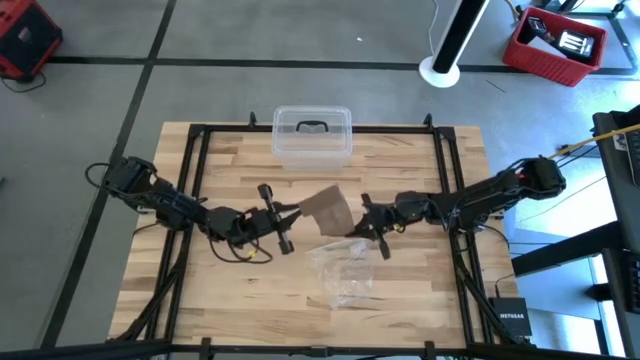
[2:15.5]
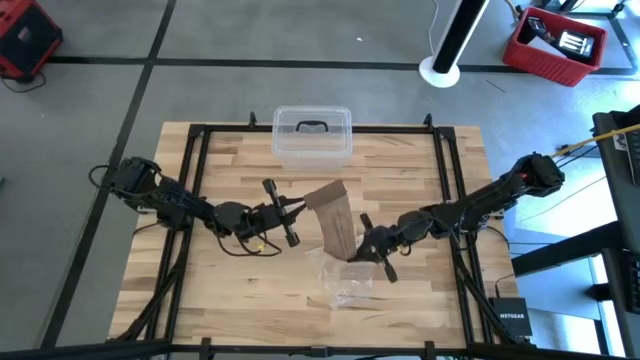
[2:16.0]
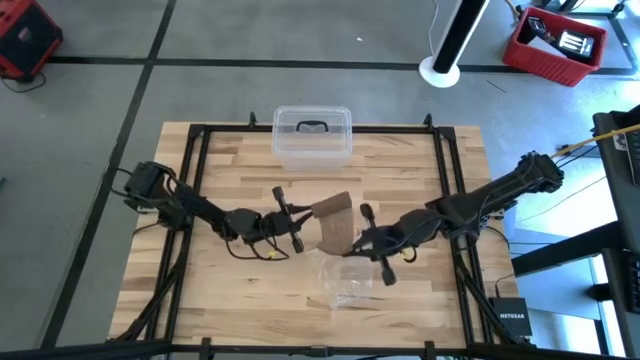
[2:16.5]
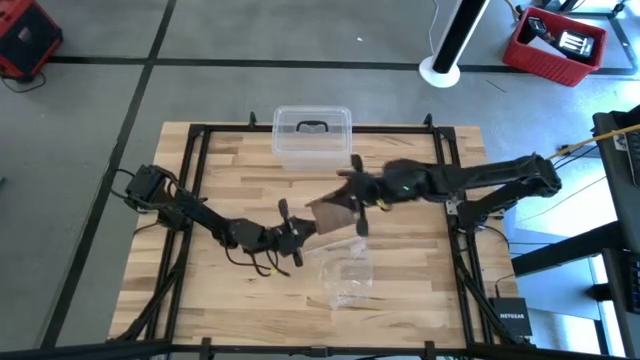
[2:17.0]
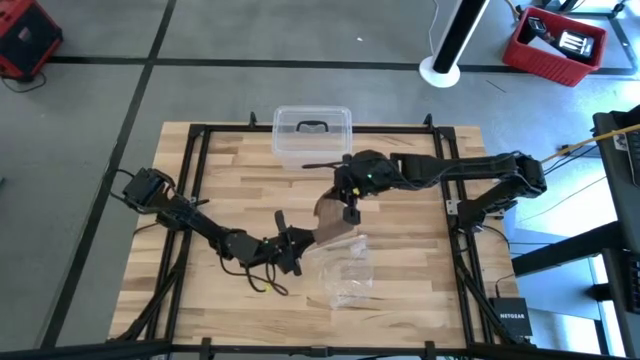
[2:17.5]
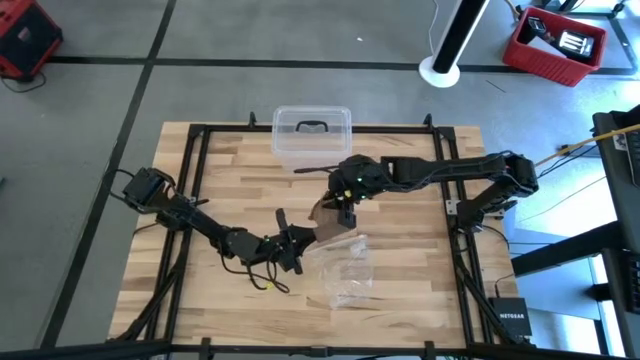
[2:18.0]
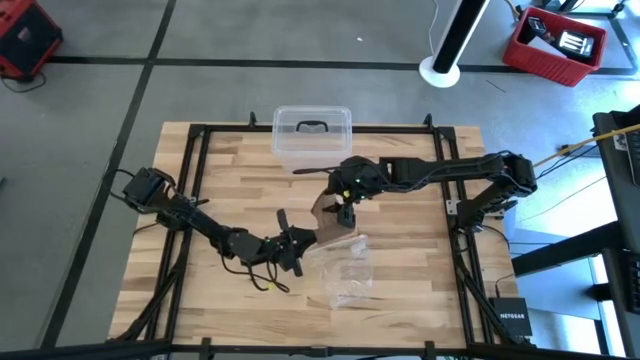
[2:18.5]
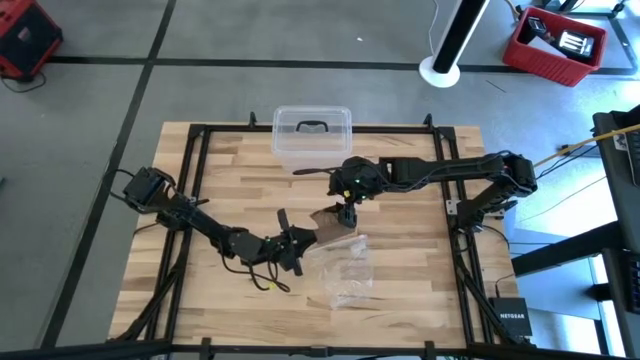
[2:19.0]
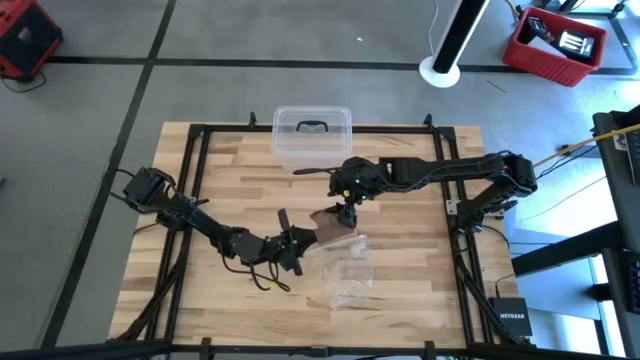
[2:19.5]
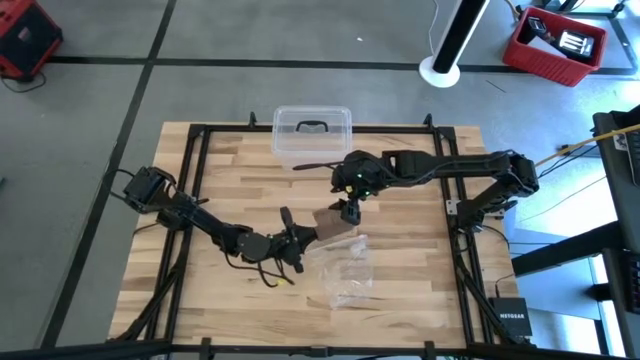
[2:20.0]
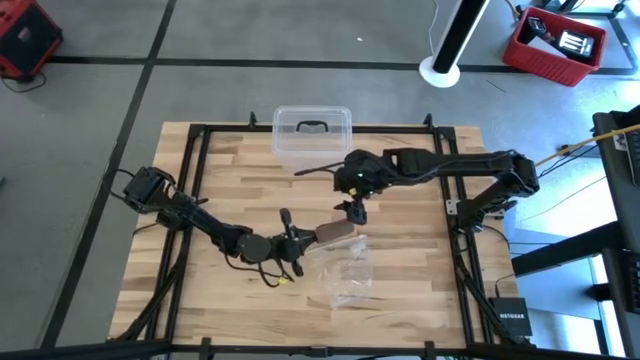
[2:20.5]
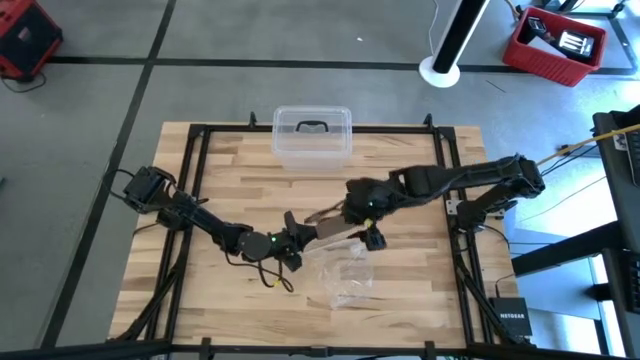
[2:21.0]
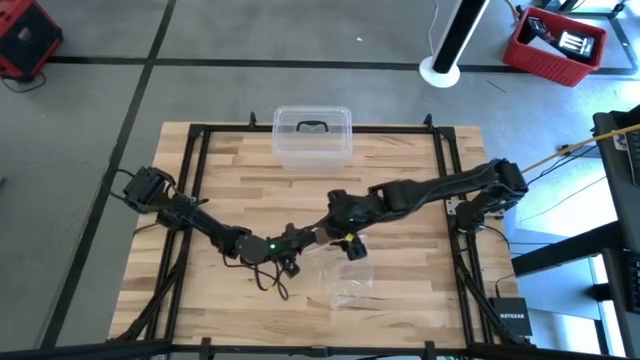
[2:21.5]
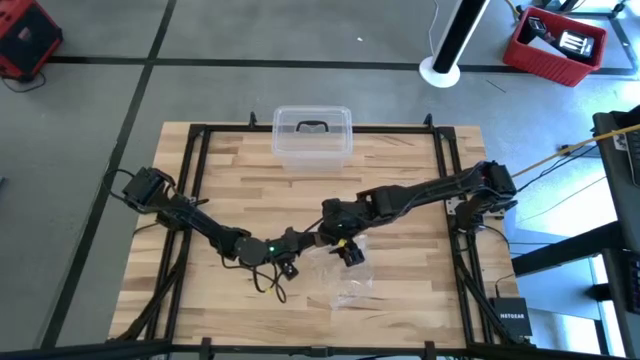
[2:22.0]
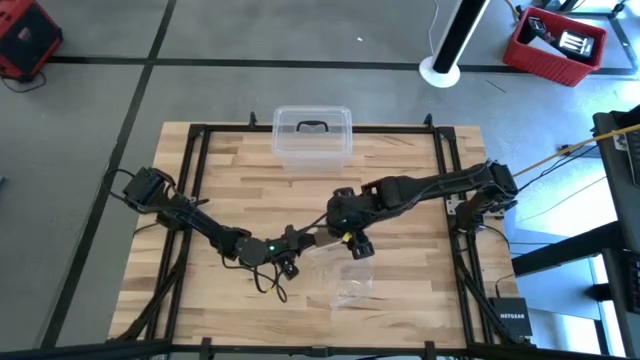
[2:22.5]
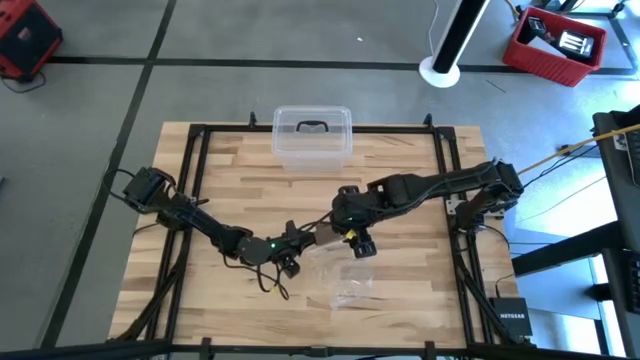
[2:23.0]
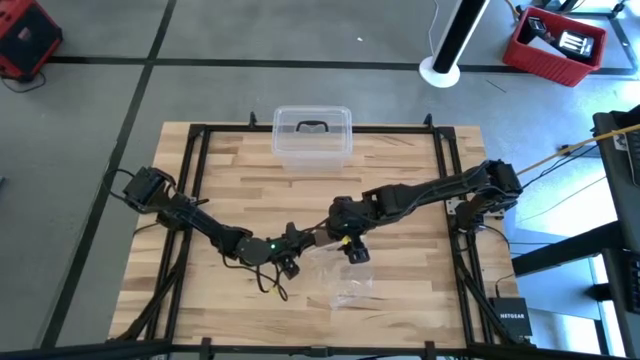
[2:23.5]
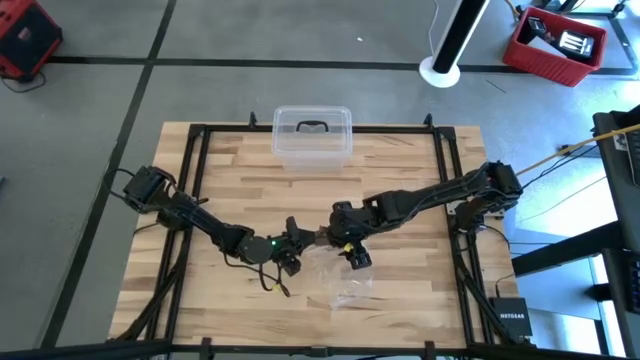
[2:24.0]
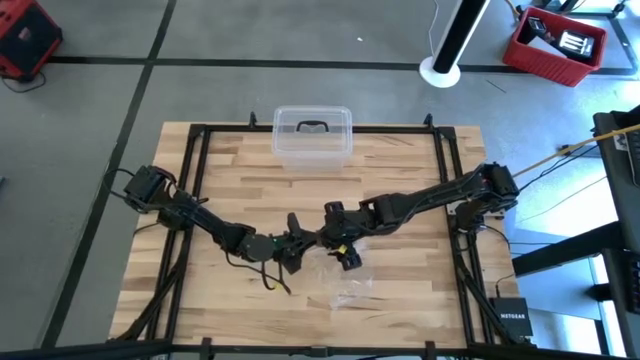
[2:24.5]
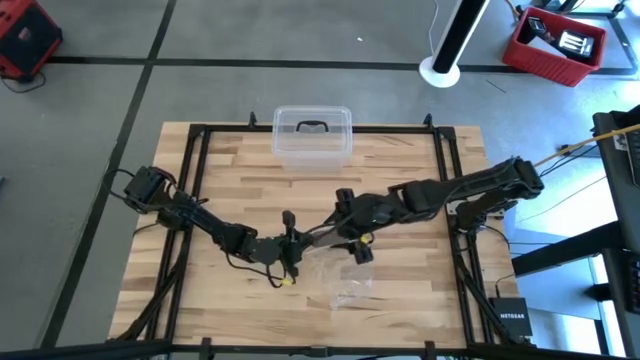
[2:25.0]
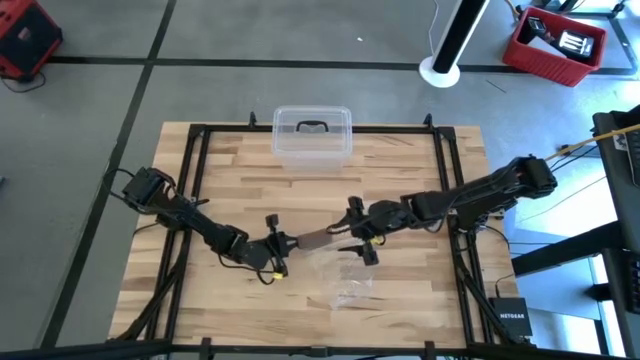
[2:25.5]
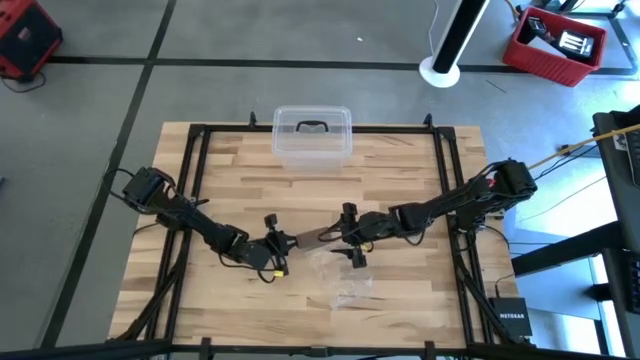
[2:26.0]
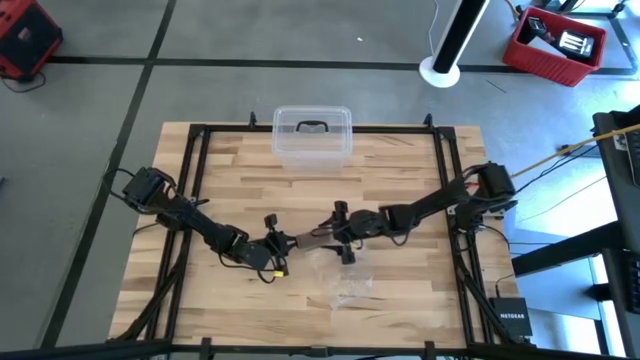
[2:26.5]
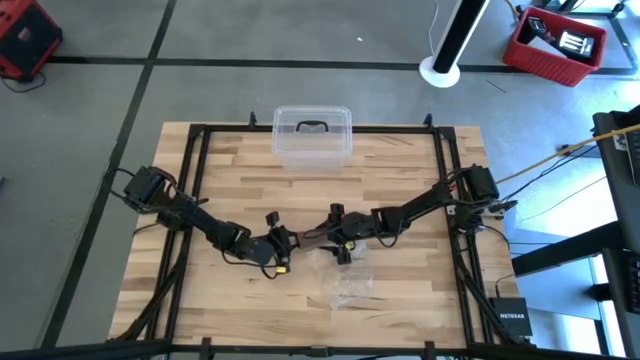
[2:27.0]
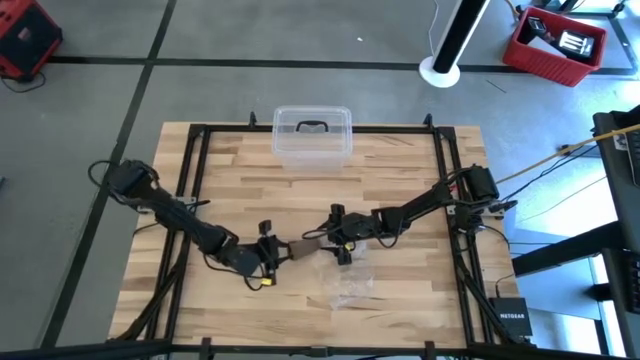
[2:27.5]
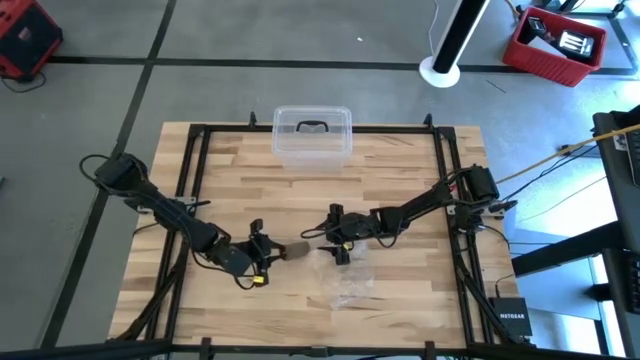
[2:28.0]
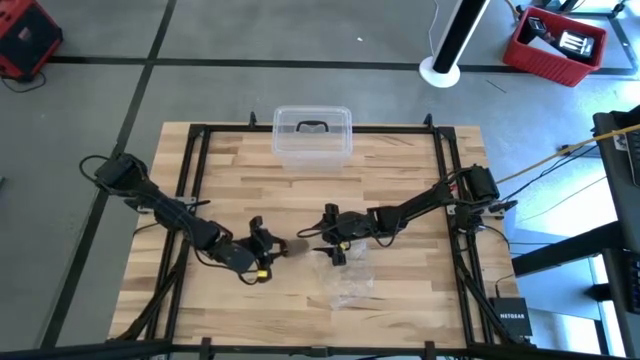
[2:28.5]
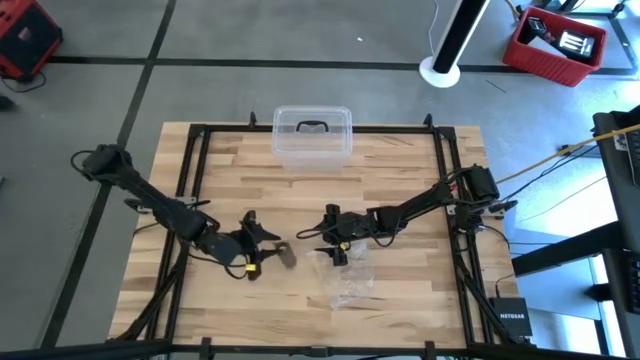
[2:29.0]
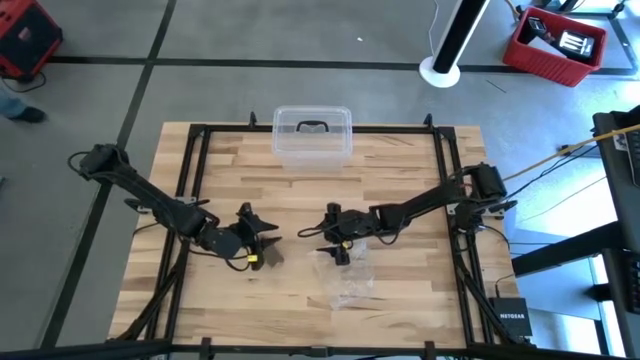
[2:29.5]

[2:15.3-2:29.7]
Task: Roll bandage
Roll the brown bandage

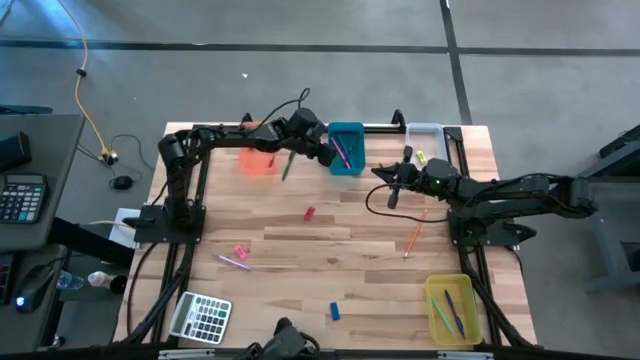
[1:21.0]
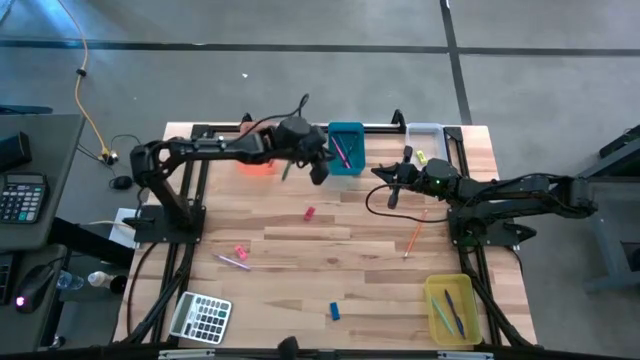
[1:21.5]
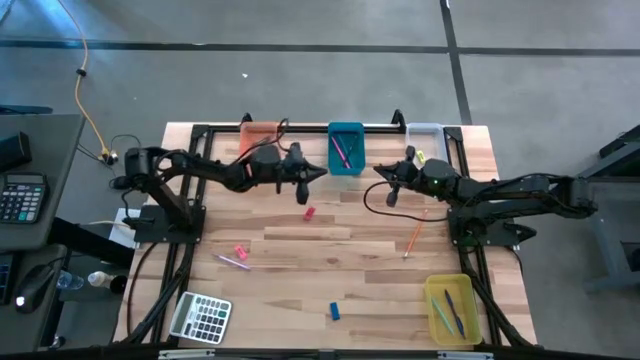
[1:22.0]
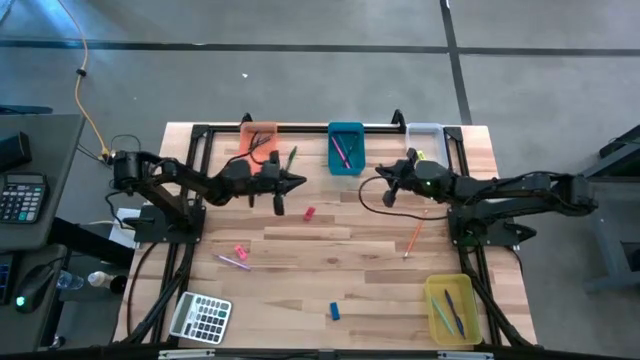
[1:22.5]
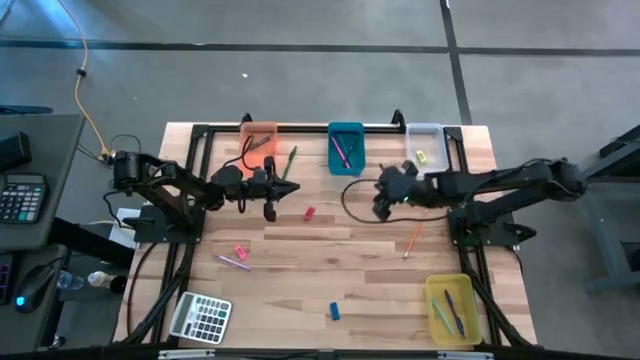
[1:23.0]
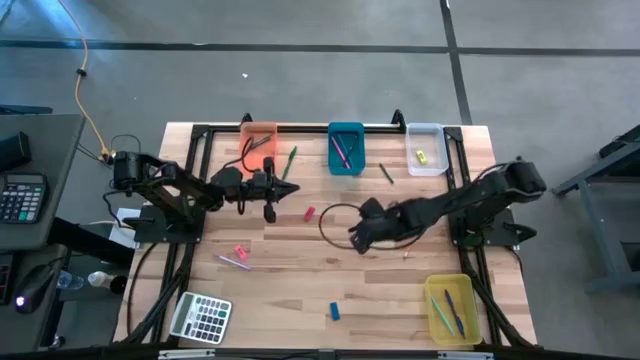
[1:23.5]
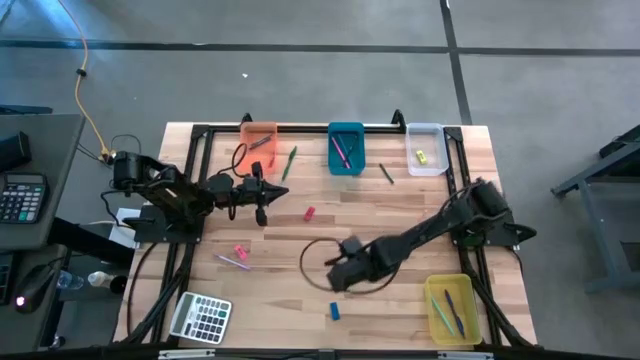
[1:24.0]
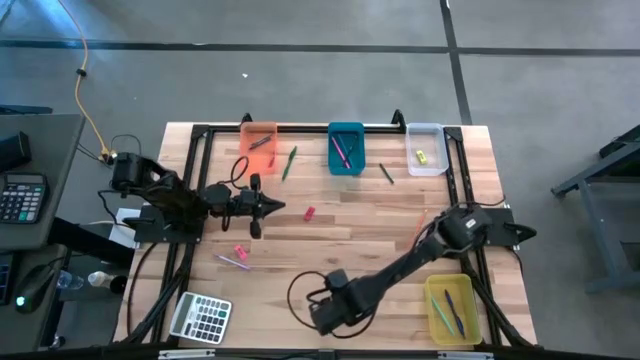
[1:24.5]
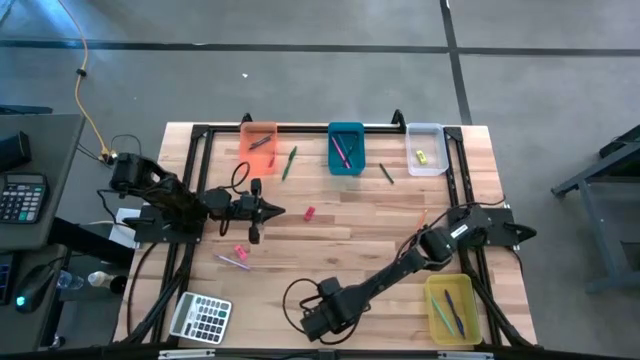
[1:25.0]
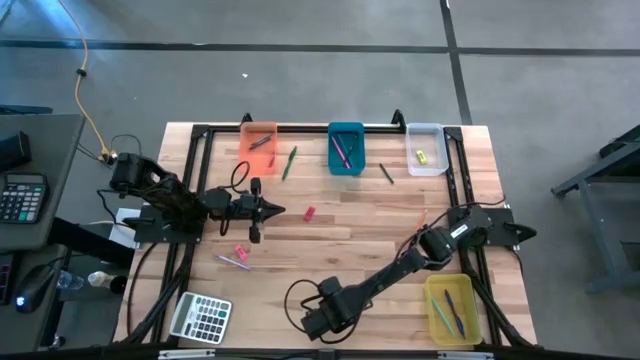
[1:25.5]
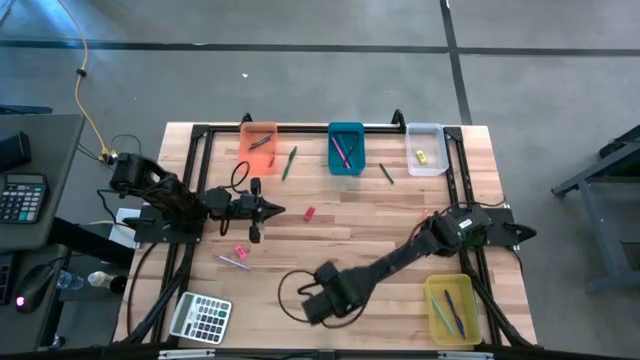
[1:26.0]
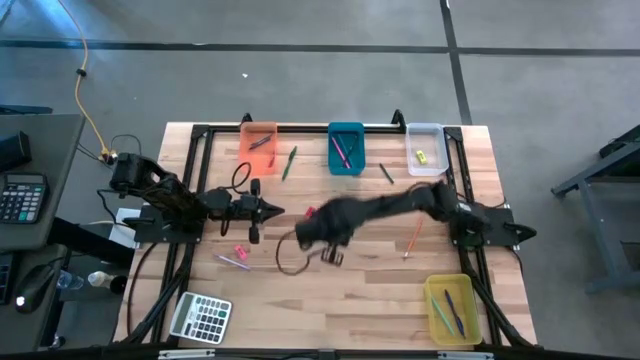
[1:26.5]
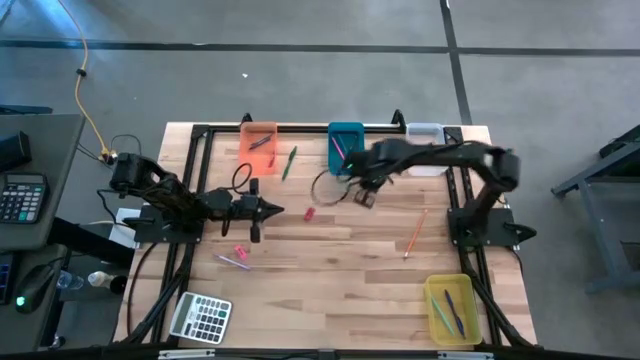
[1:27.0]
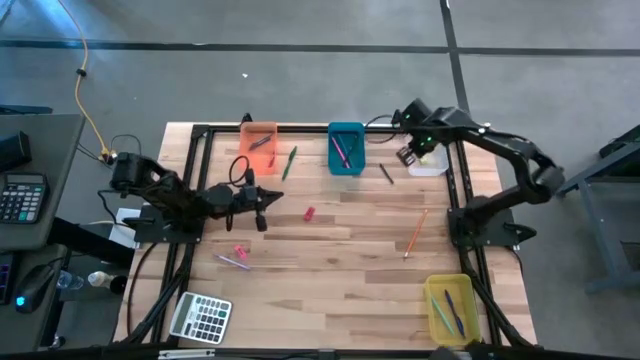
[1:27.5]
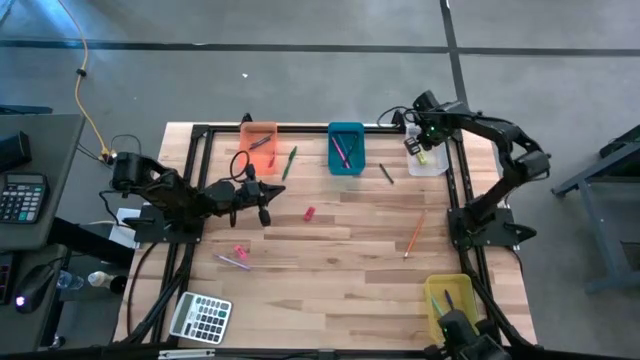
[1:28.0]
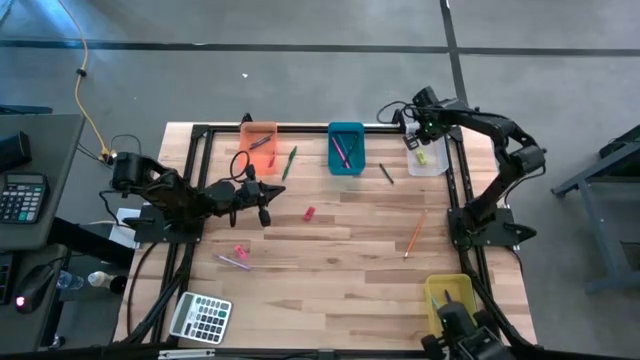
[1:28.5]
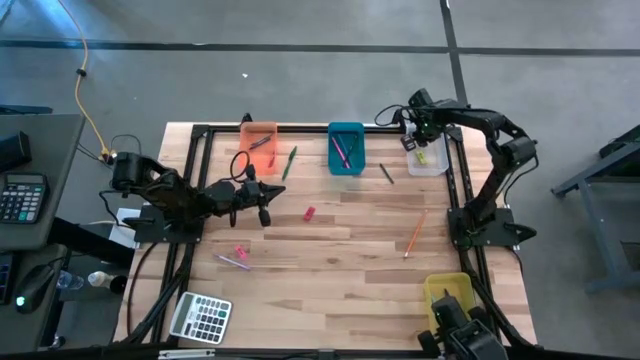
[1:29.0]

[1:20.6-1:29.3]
Task: Sort crayons/erasers/pens/pencils in bins
Put the blue eraser into the transparent bin
